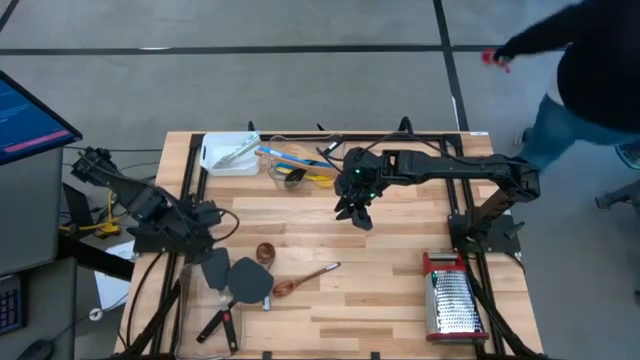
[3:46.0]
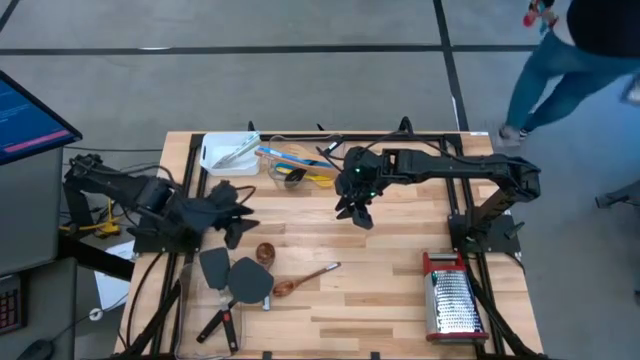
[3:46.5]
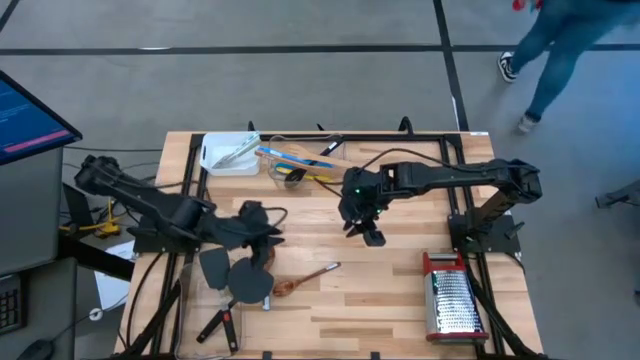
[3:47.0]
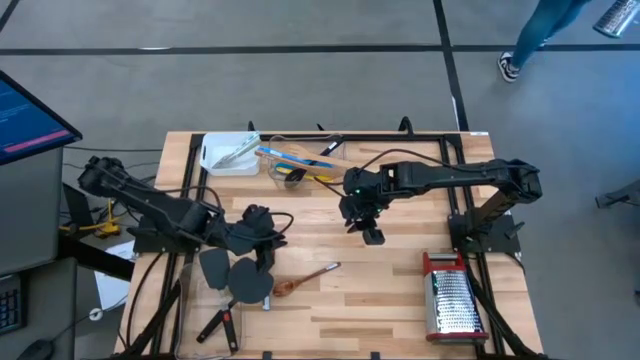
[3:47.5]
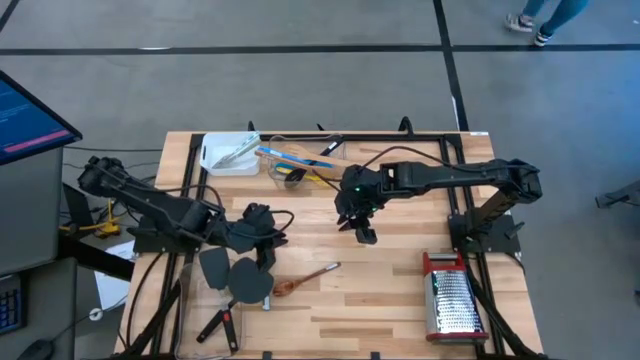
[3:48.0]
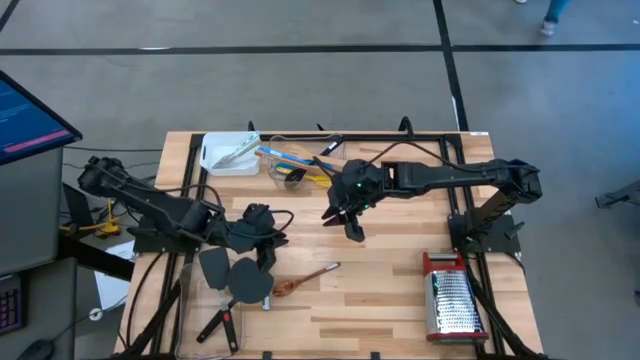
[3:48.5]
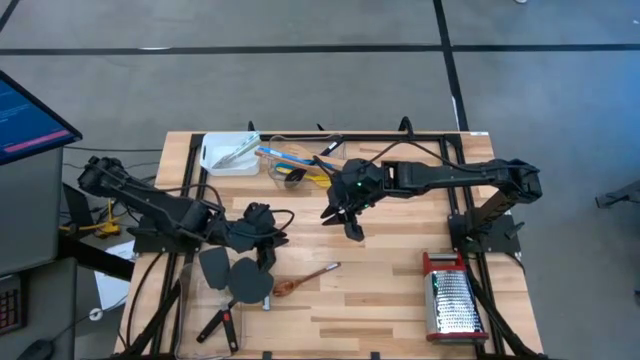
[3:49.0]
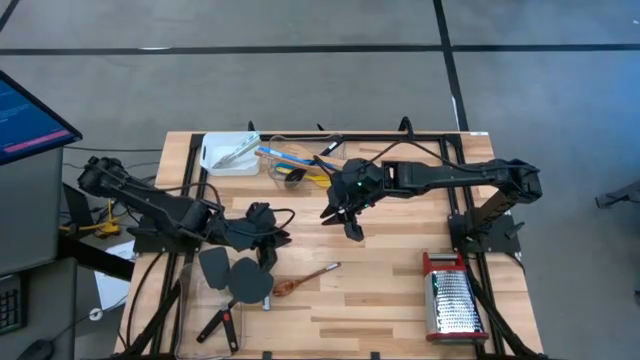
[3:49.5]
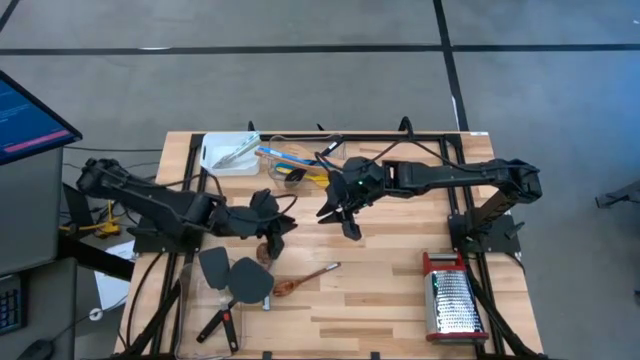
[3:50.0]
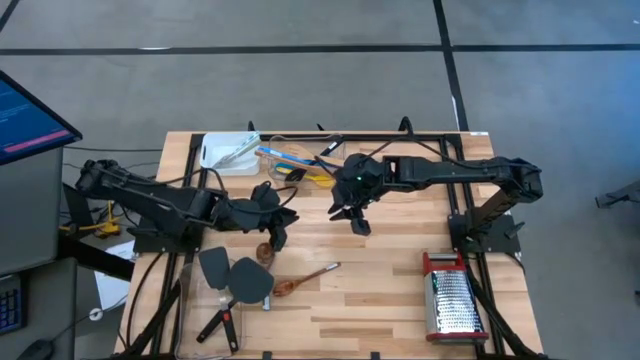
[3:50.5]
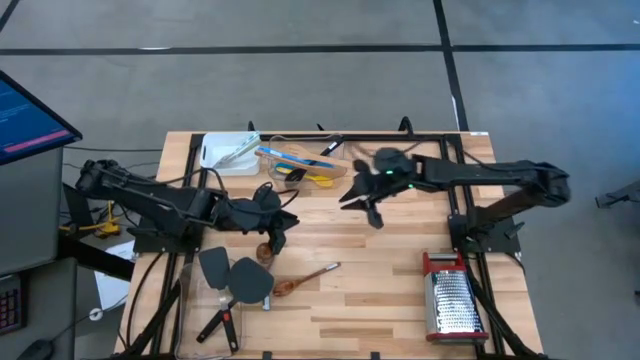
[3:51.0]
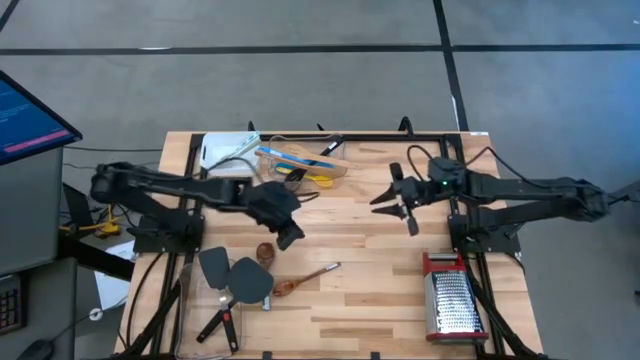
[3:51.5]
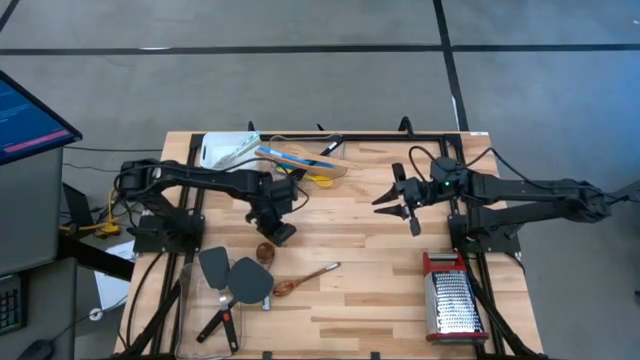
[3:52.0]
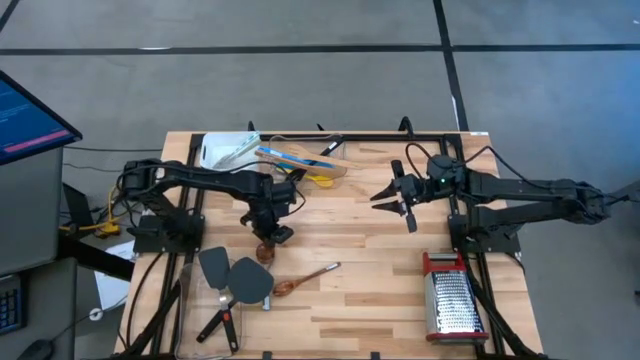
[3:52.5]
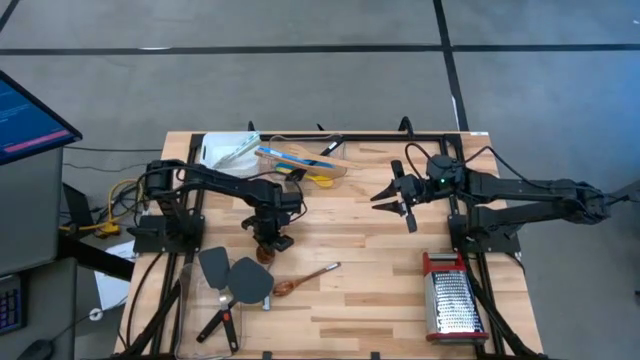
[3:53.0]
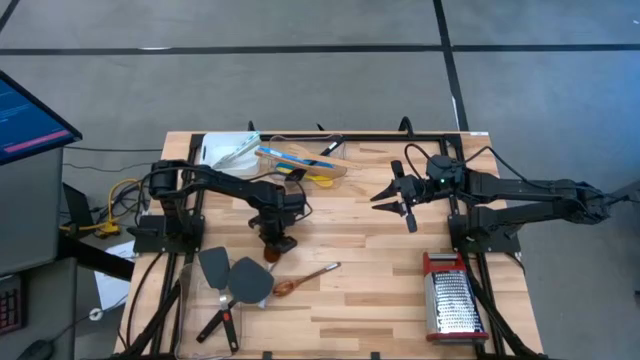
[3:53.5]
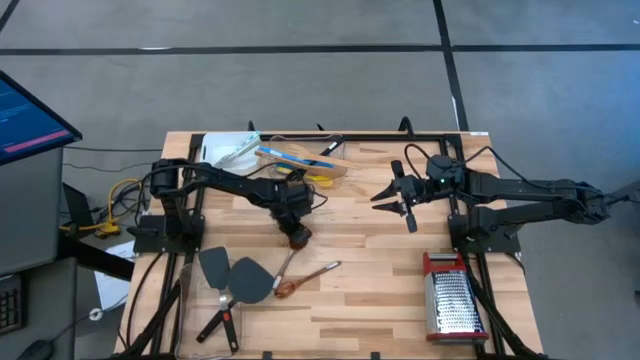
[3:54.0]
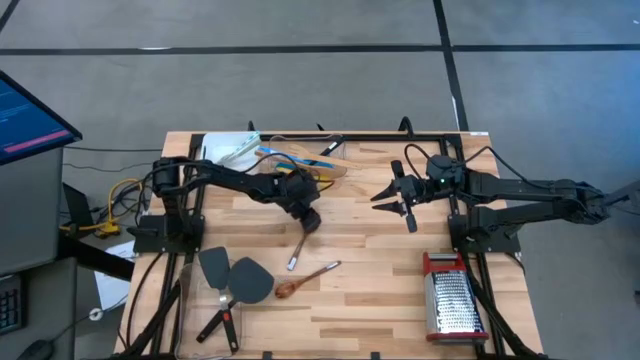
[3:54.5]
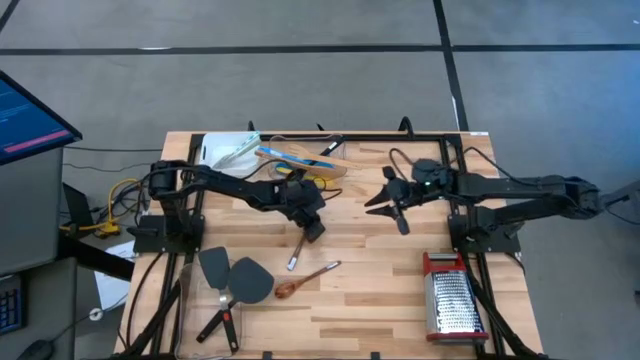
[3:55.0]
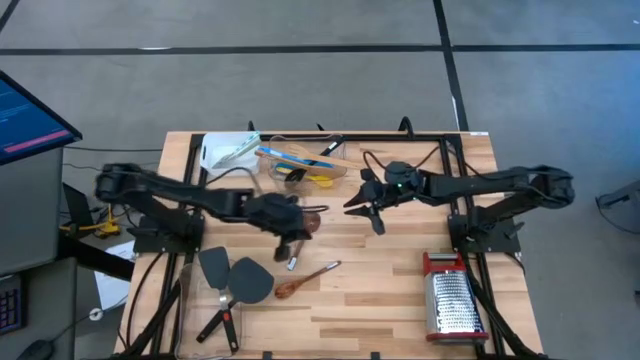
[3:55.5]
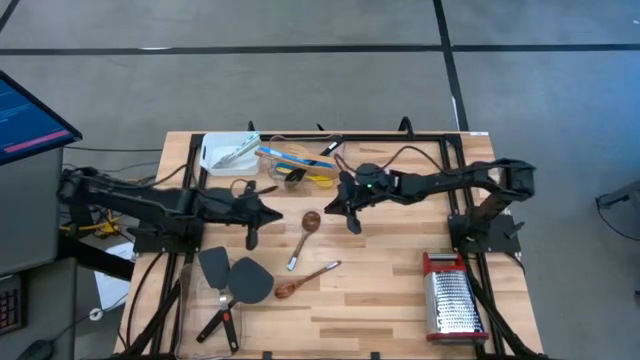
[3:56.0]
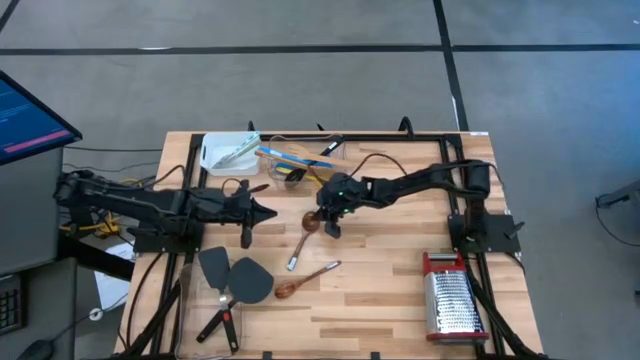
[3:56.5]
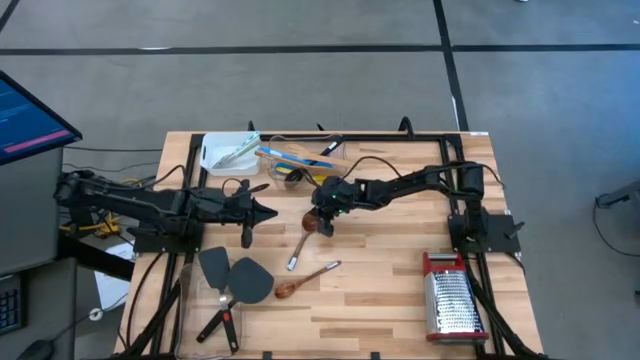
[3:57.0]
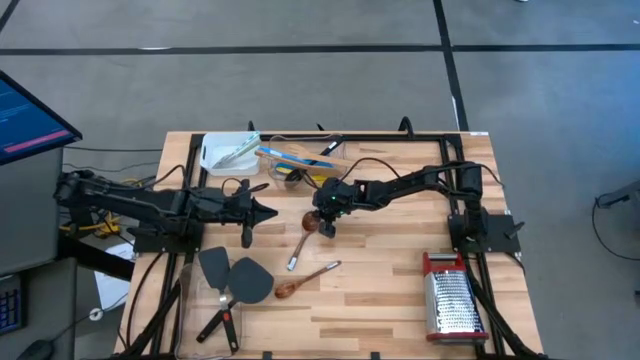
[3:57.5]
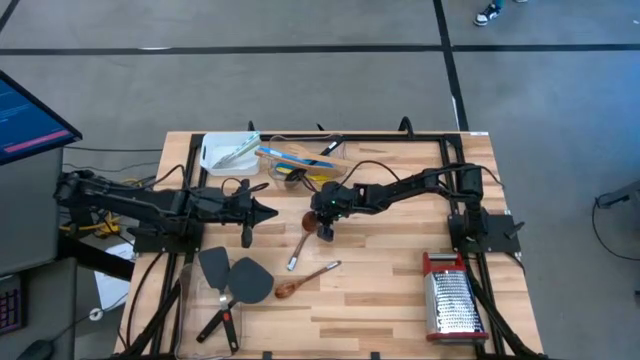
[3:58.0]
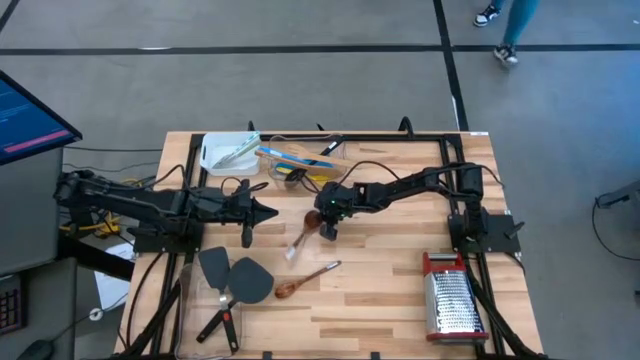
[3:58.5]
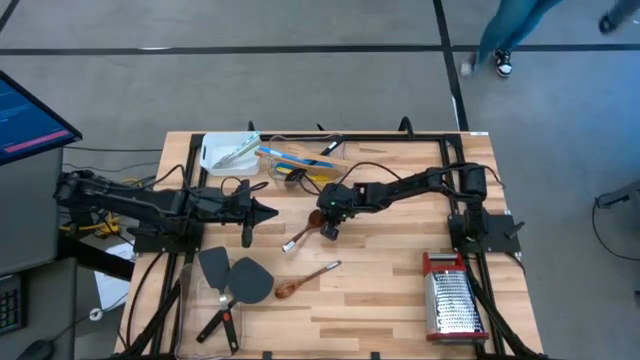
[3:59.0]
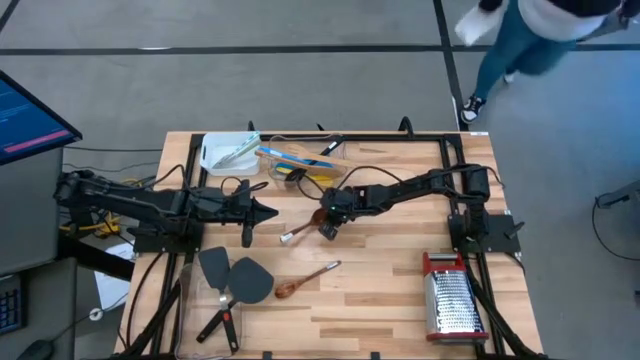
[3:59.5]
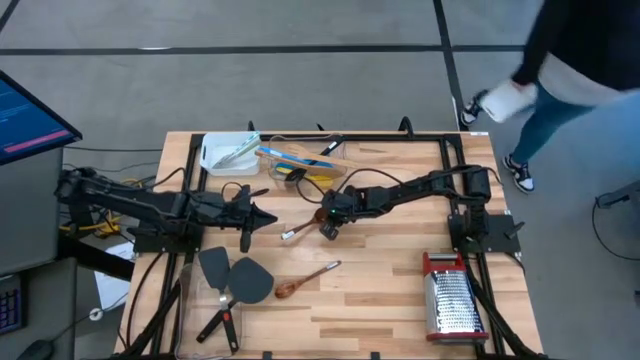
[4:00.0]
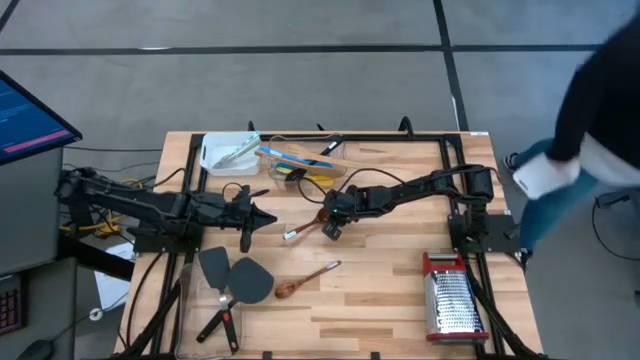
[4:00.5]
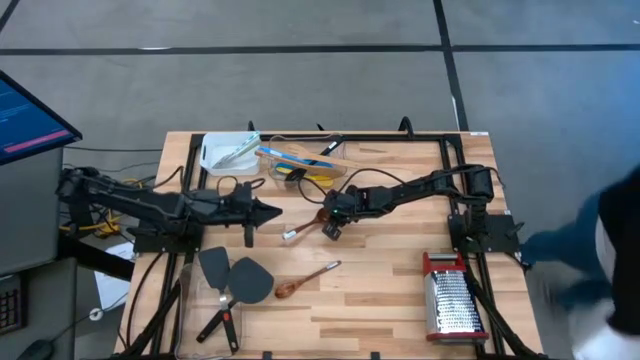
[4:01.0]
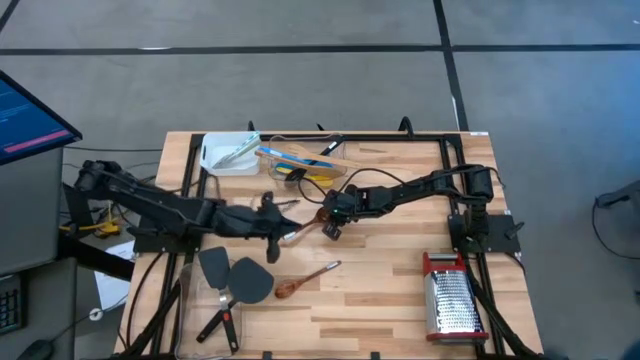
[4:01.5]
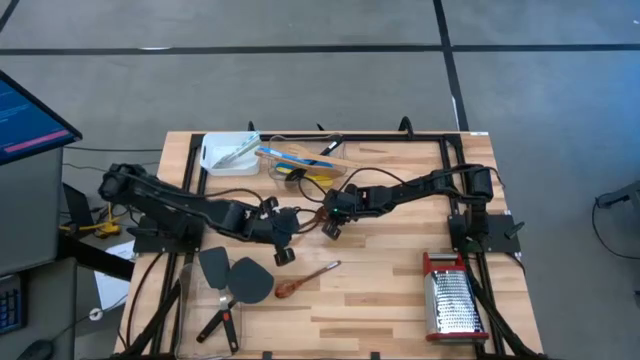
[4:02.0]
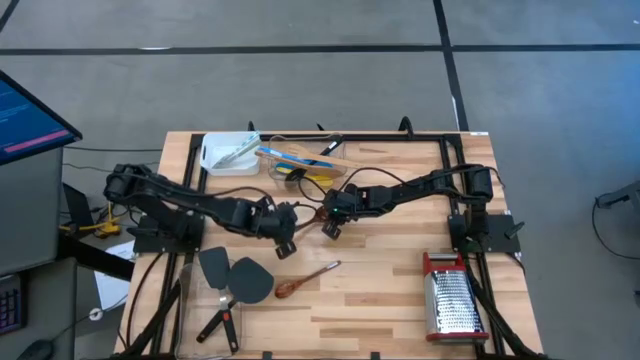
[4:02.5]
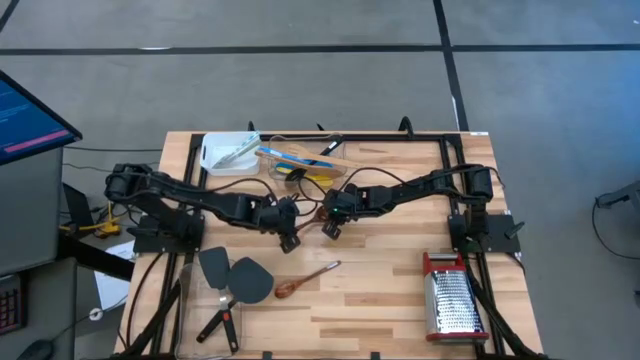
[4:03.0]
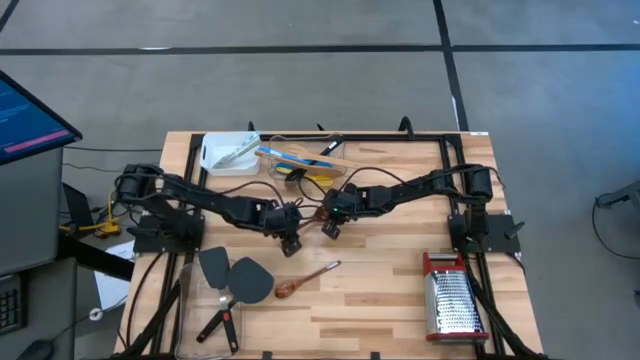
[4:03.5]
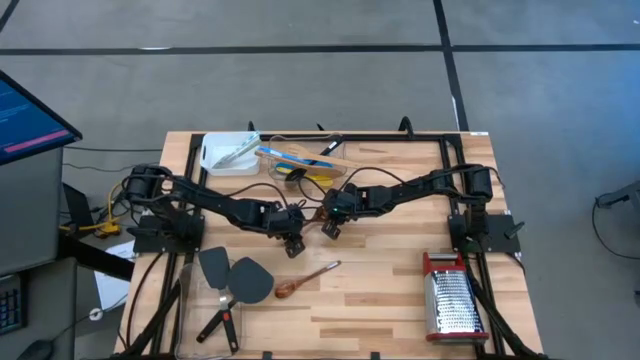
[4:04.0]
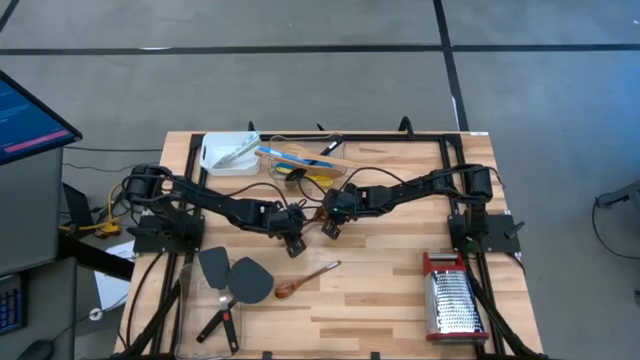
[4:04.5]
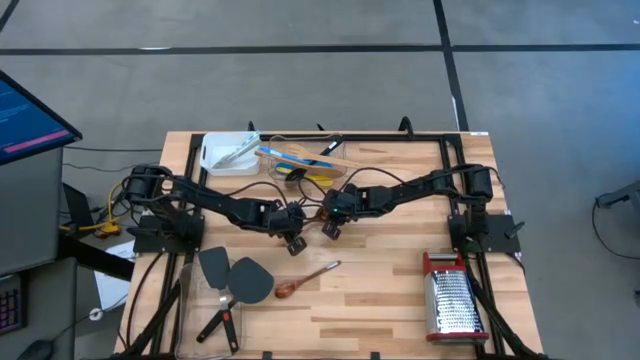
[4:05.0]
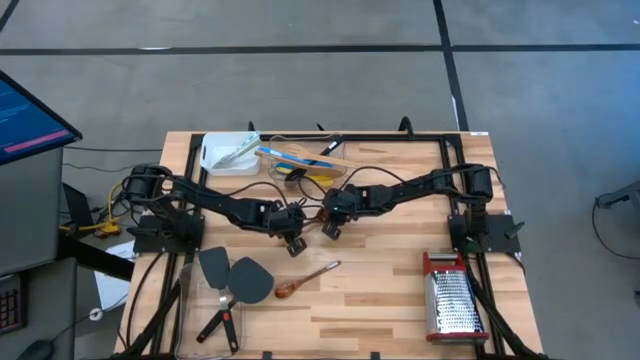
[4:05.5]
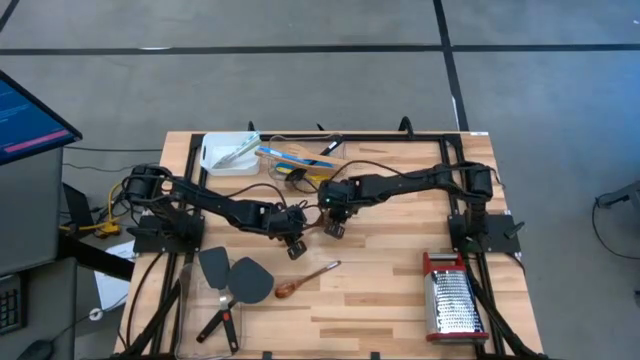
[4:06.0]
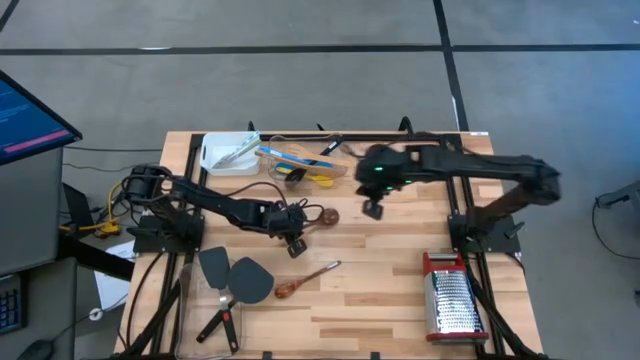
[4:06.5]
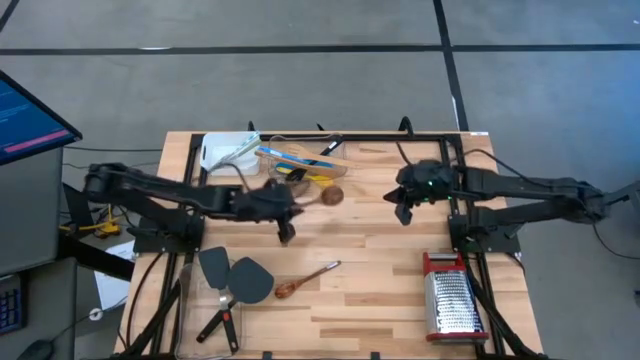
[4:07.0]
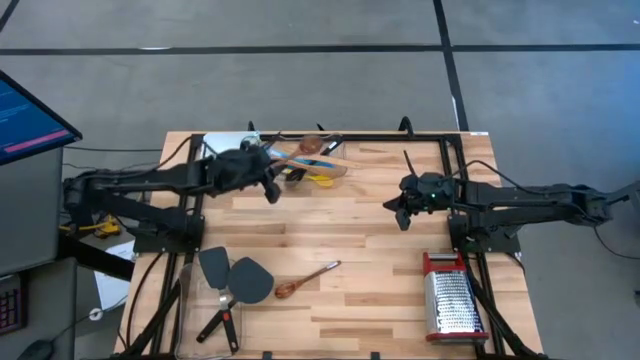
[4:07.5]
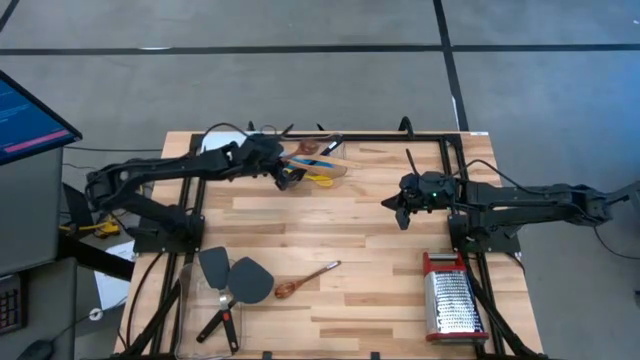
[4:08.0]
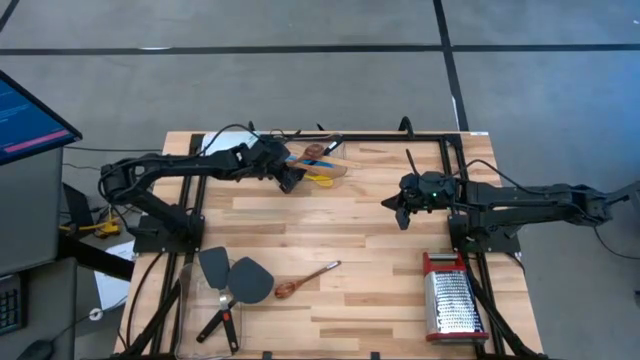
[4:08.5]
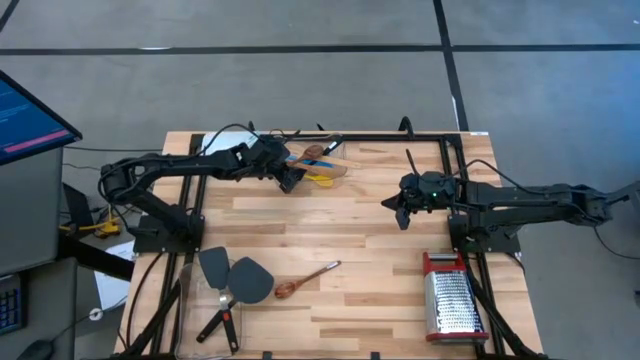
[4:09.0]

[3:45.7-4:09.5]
Task: Pick & Place Kitchen Items
Put the brown serving spoon into the top transparent bin
